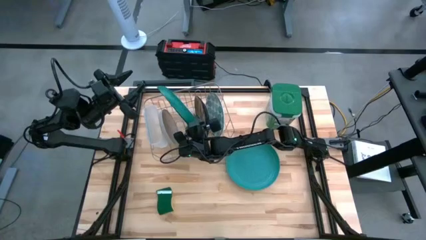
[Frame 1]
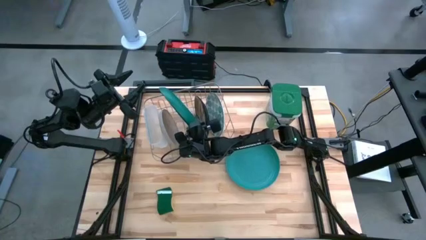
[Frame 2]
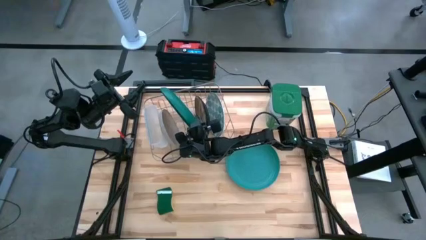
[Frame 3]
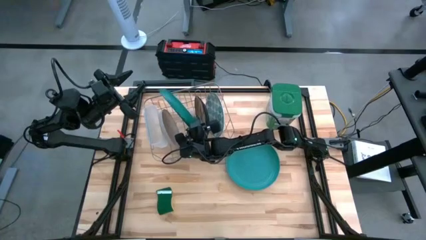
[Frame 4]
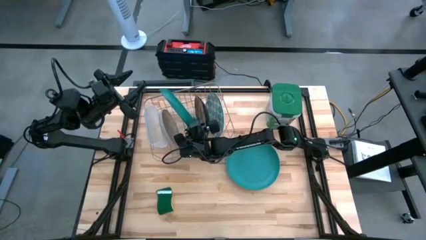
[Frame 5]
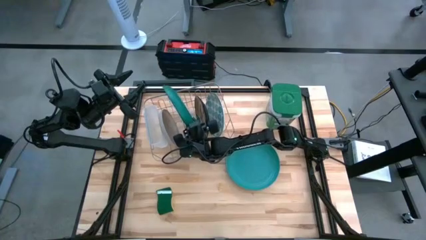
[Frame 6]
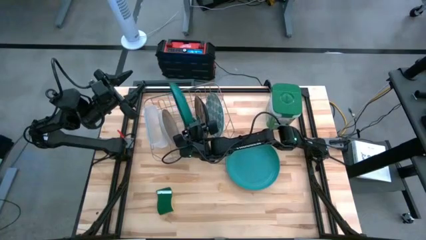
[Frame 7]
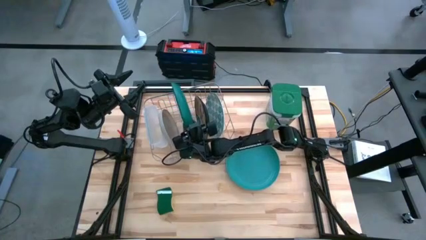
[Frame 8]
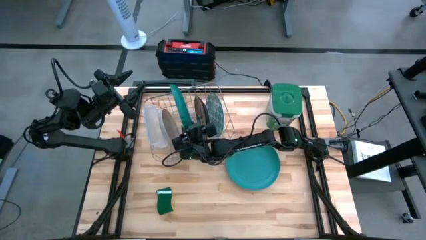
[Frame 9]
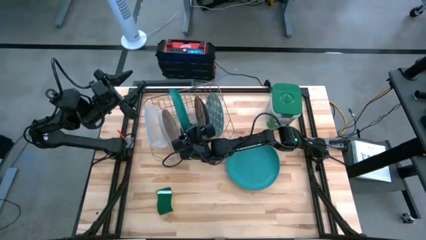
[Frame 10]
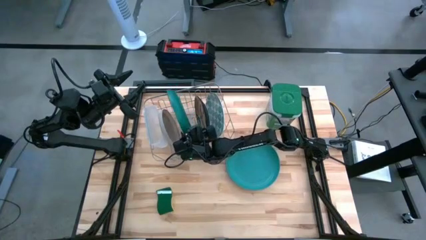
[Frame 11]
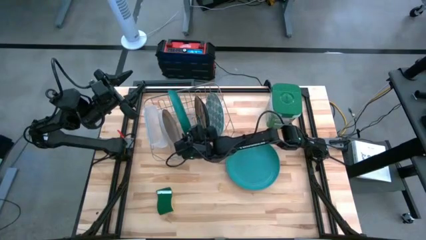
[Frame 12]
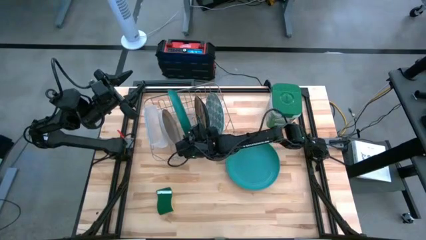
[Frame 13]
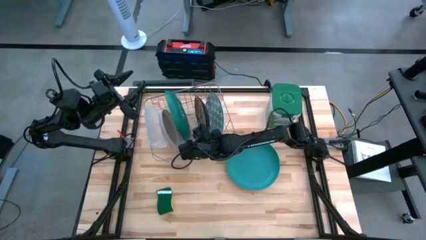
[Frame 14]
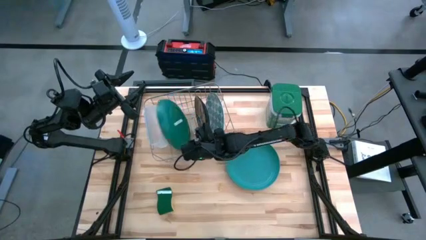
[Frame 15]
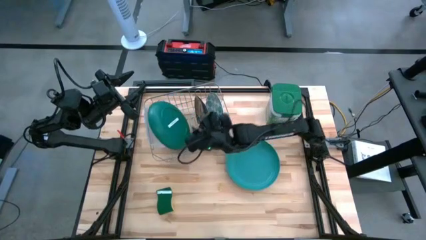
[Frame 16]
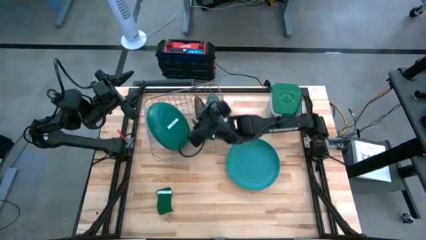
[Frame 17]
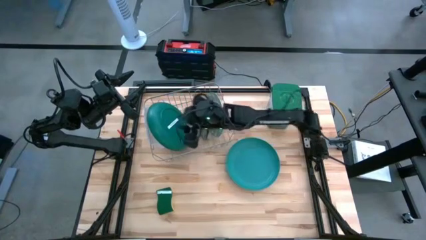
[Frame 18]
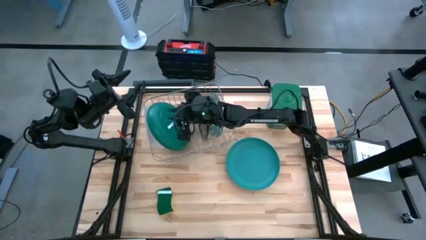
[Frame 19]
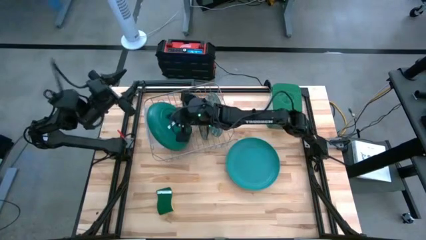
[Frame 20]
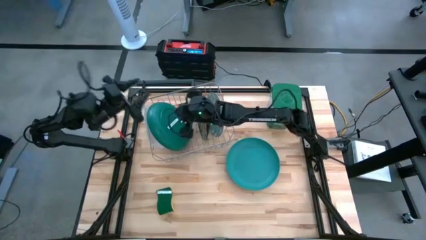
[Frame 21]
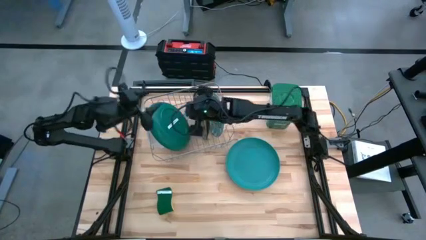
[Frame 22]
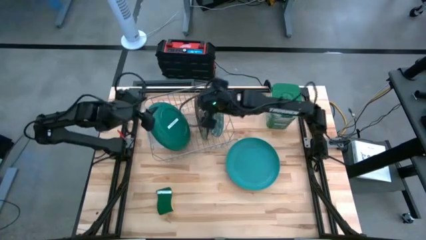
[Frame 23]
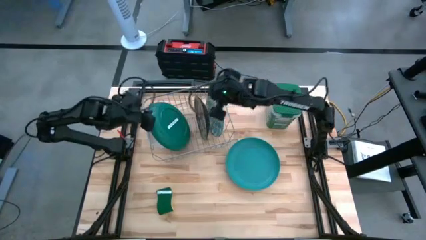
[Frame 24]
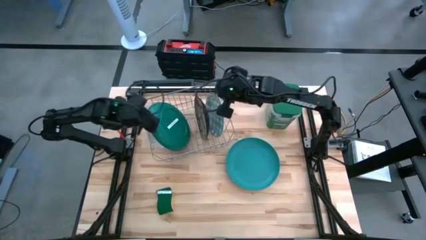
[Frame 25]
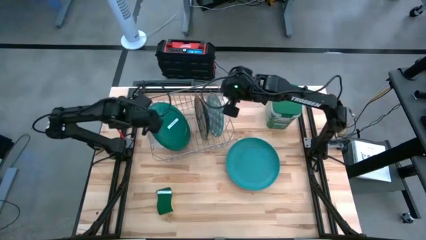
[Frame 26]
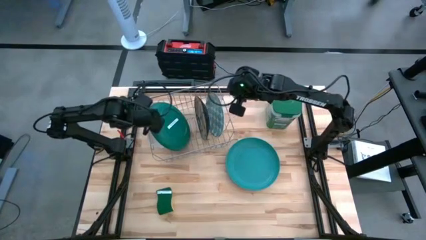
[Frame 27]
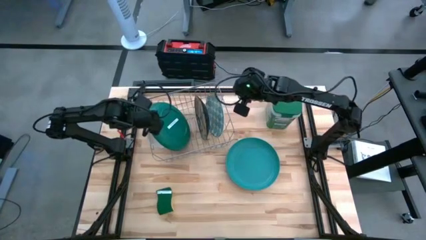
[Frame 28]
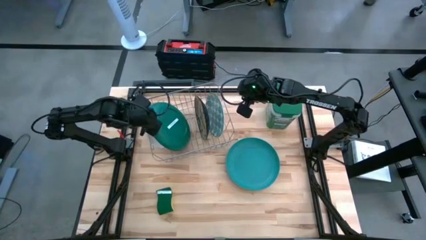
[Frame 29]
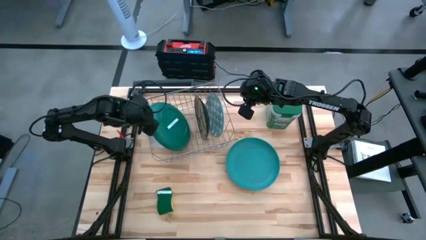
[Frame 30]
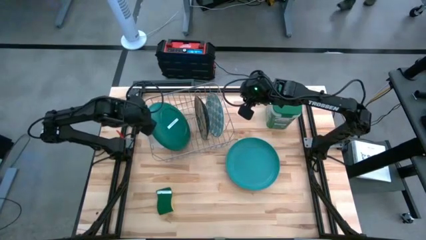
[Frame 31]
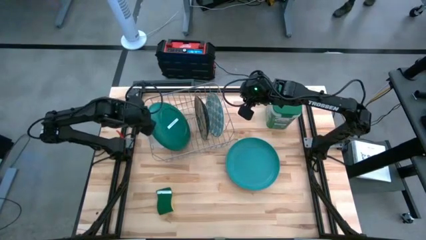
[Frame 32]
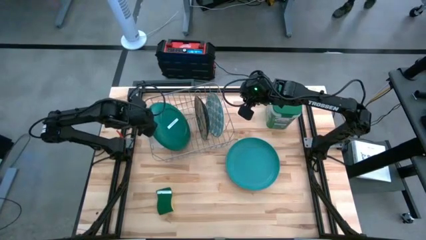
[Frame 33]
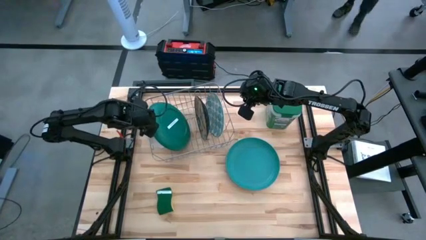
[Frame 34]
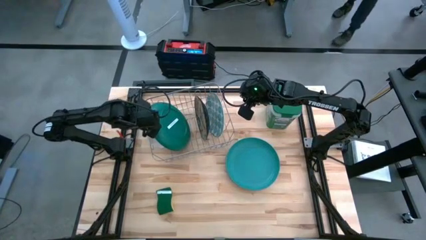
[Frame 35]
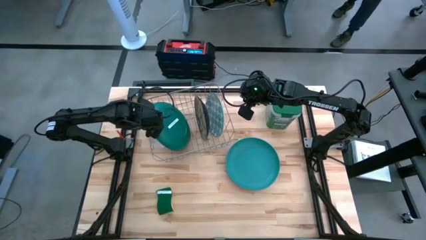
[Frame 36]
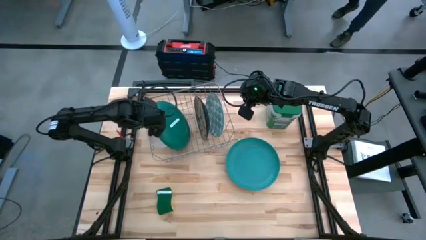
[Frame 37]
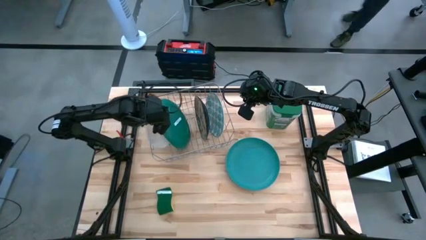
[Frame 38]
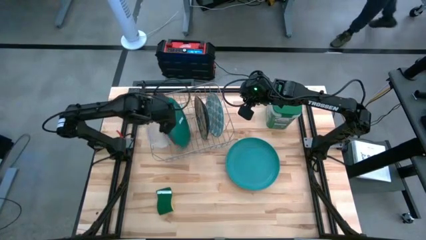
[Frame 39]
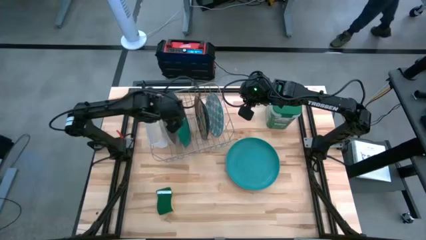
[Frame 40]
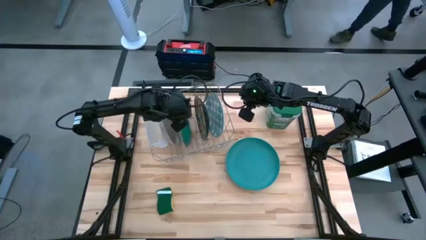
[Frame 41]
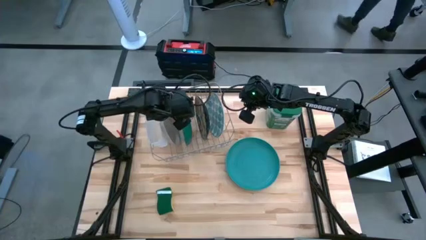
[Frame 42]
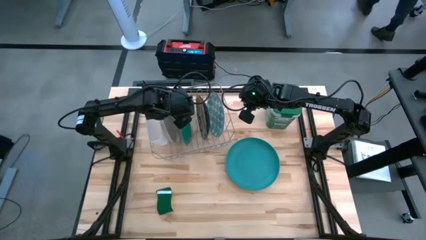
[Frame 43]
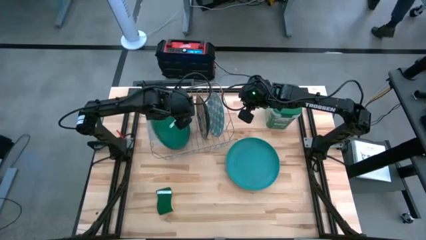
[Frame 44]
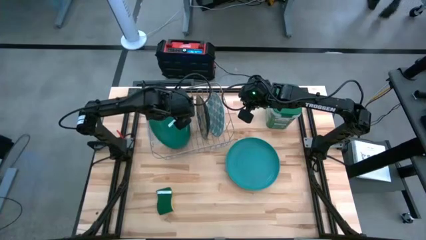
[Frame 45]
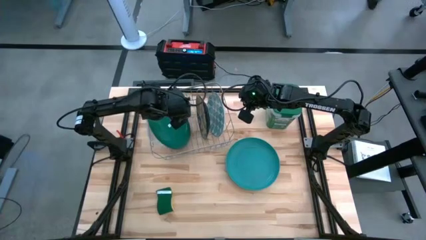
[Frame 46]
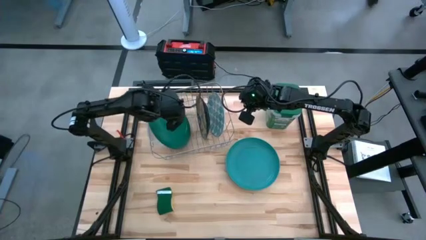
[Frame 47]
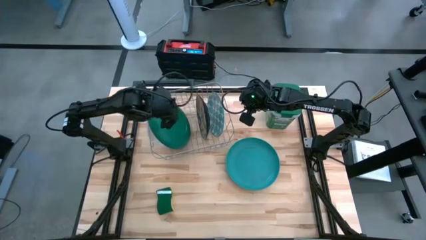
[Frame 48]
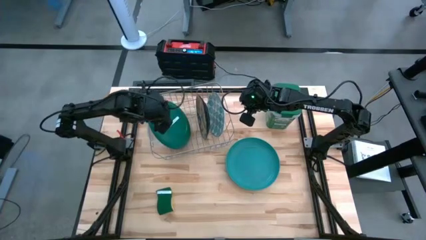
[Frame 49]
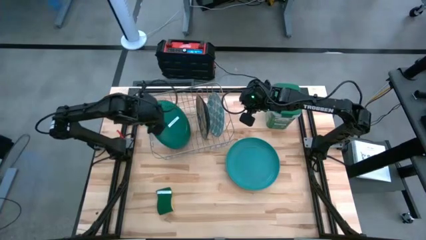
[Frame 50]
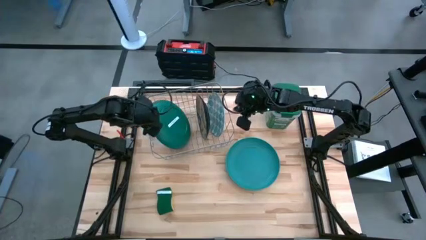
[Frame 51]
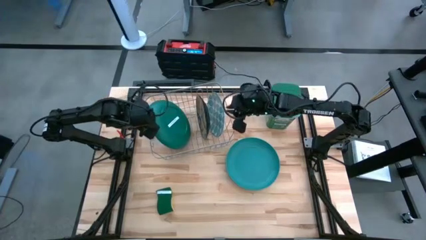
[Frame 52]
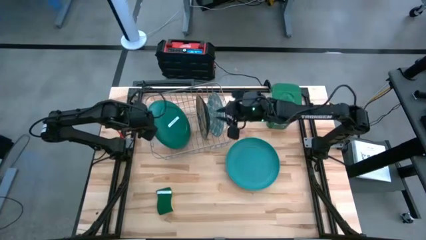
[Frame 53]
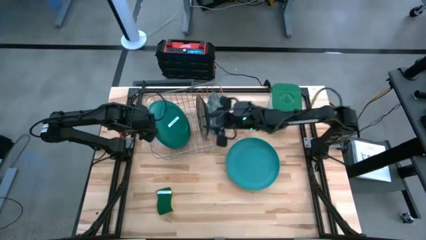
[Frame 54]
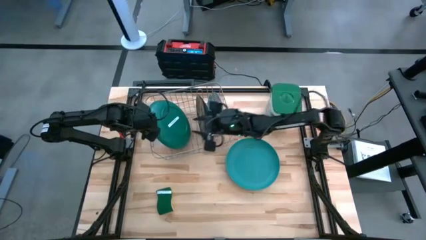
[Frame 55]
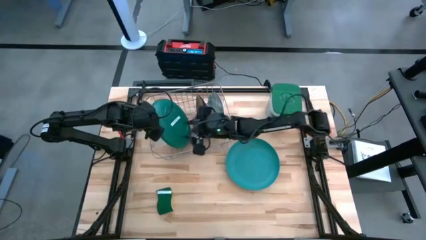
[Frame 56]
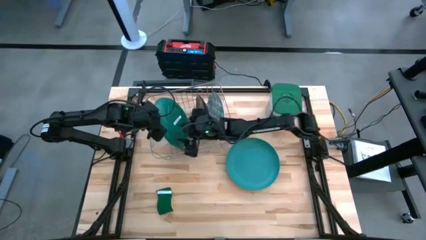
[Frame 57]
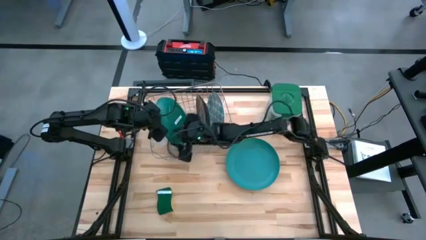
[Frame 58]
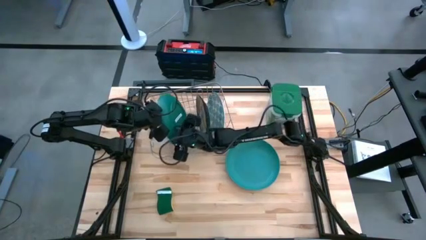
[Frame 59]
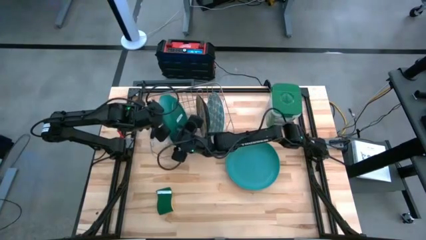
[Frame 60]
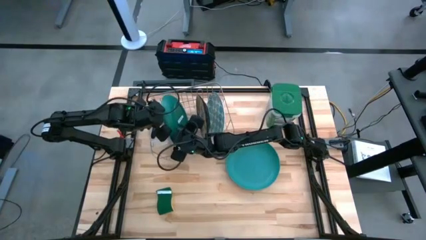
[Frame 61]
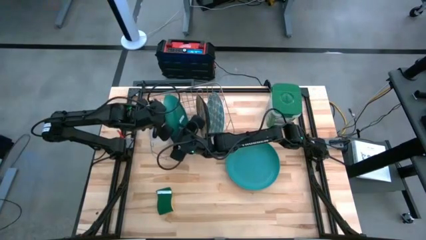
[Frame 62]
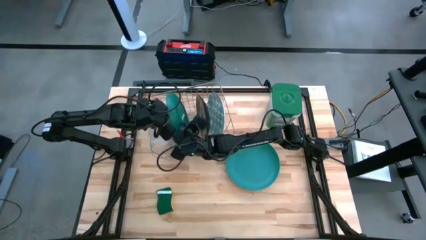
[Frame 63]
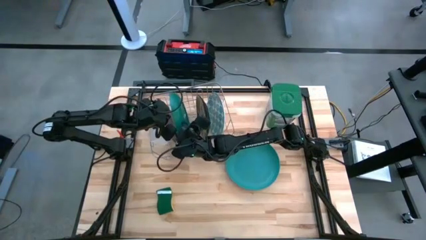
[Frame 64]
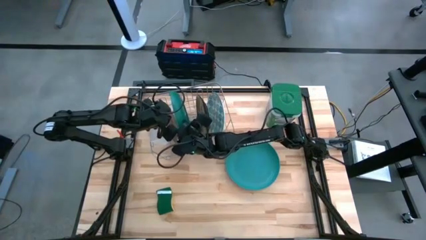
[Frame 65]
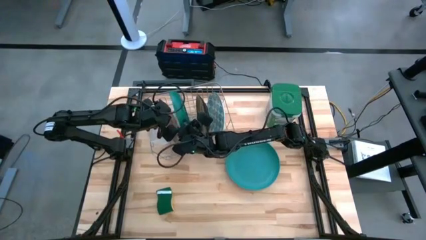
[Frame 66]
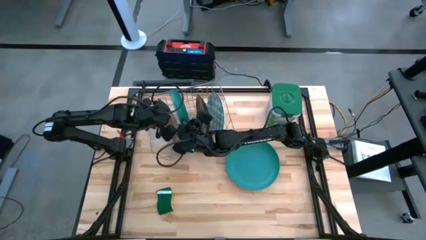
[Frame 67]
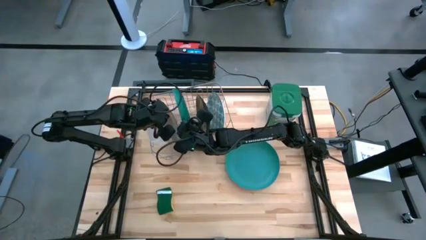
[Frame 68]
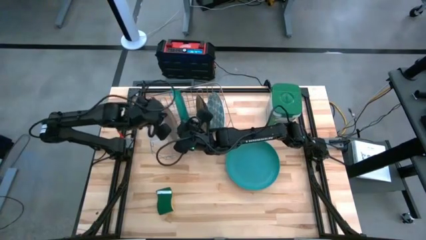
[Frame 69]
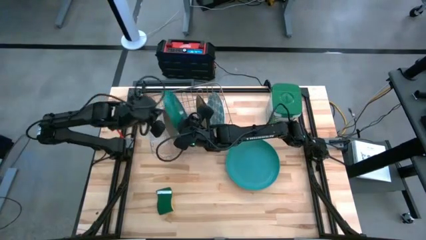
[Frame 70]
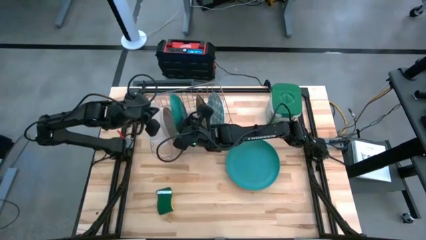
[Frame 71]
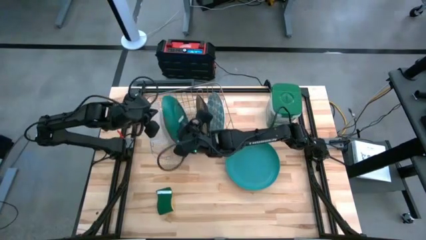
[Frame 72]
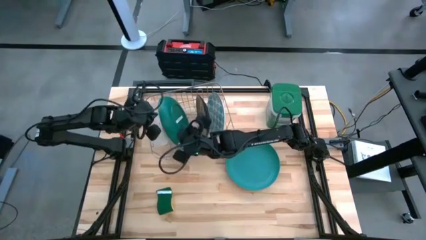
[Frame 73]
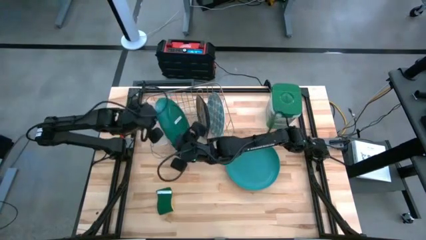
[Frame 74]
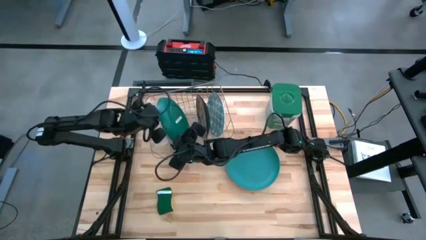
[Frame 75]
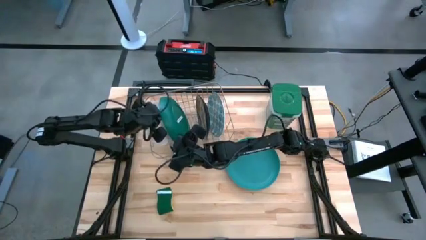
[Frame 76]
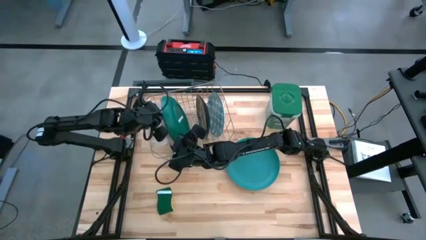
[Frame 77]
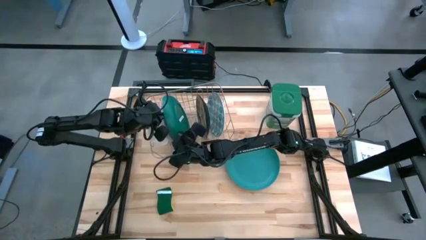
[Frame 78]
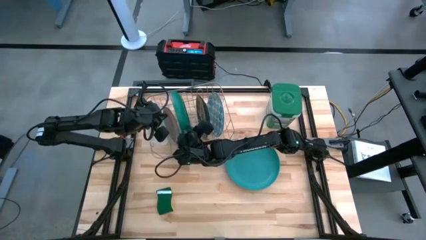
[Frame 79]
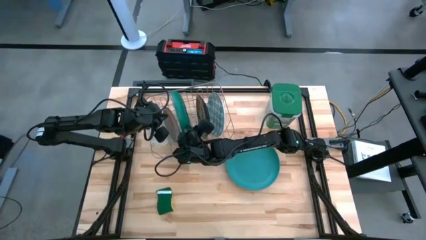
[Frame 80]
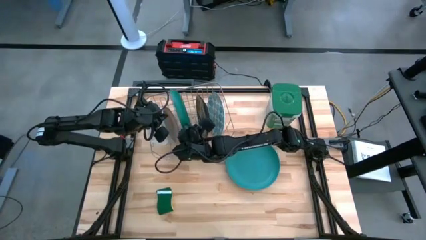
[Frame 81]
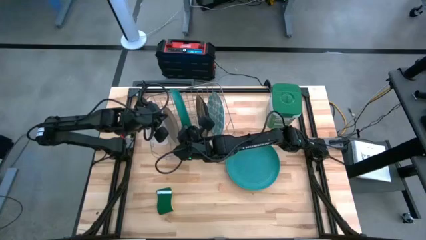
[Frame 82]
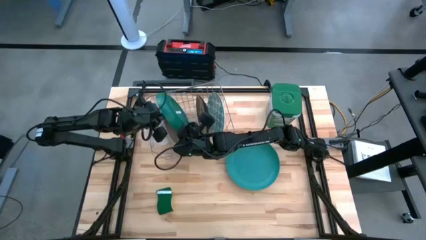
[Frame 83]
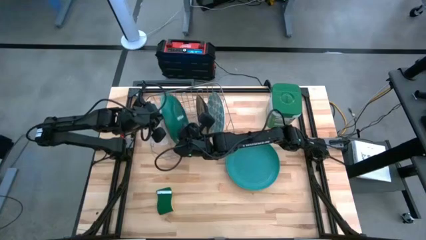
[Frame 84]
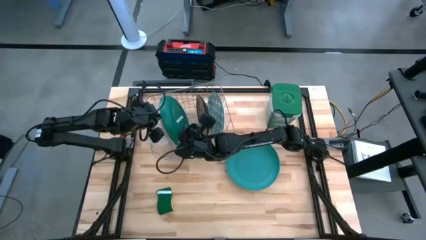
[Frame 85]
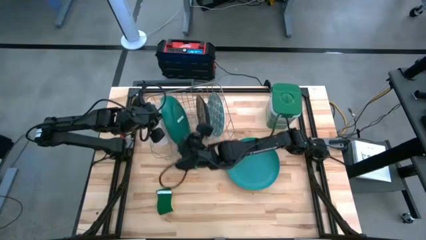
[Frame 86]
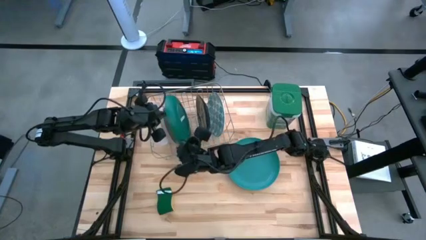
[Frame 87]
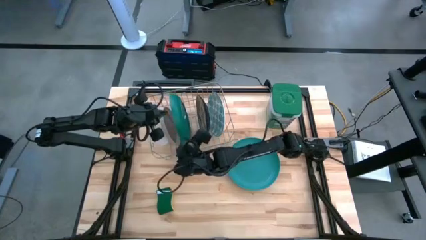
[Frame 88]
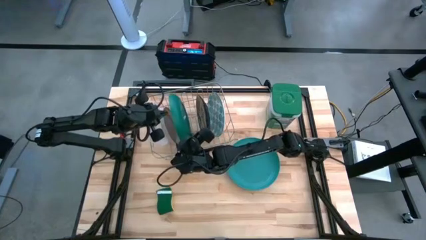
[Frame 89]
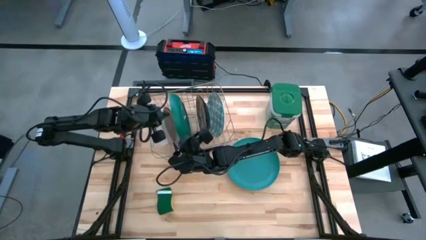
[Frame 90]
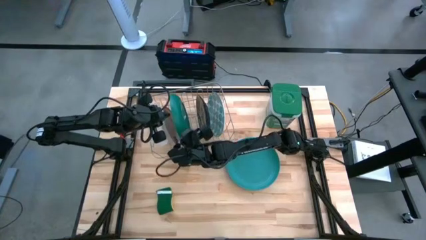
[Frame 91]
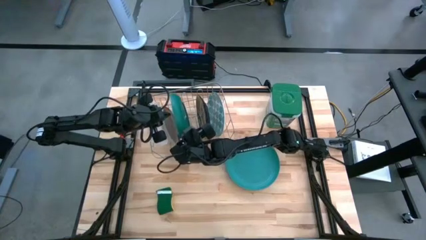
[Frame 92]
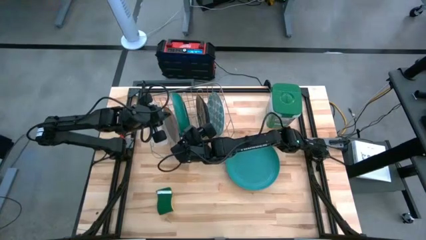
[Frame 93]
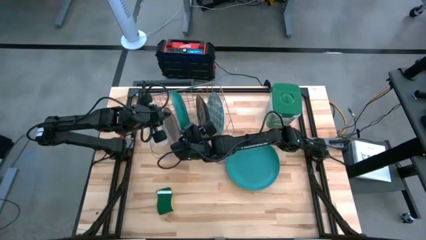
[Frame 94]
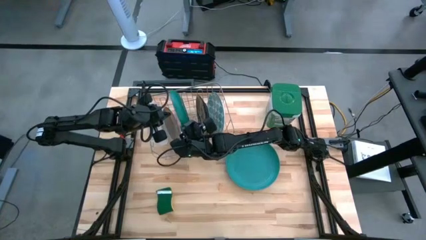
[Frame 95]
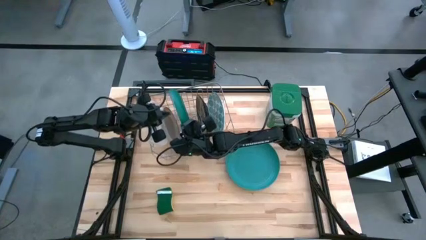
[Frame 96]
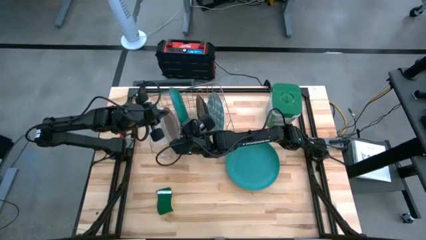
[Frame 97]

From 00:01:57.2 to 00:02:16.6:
Task: Sort dishes
Put the green plate on the dish rack
